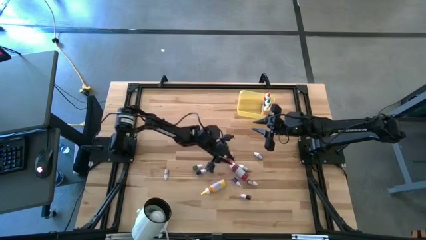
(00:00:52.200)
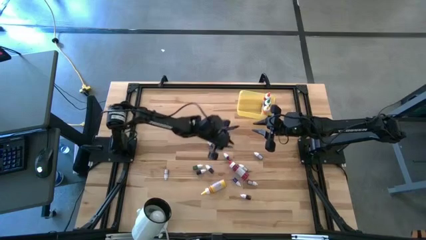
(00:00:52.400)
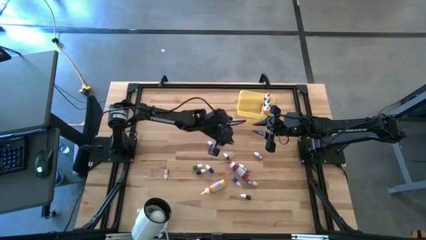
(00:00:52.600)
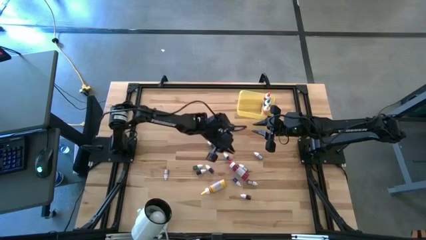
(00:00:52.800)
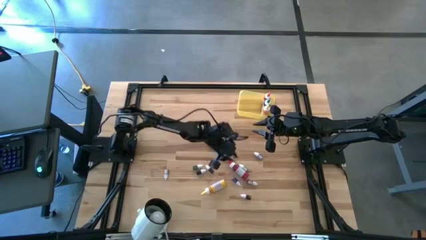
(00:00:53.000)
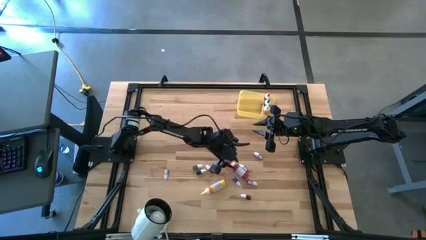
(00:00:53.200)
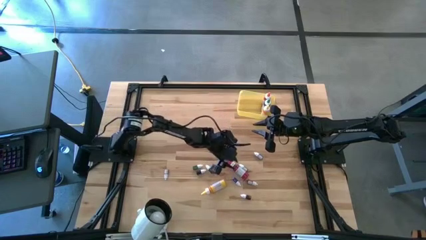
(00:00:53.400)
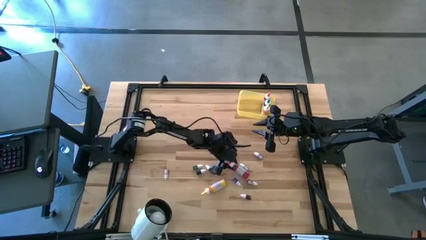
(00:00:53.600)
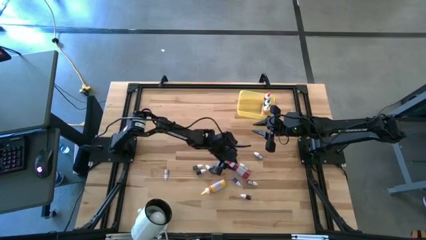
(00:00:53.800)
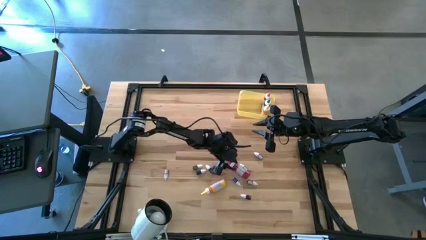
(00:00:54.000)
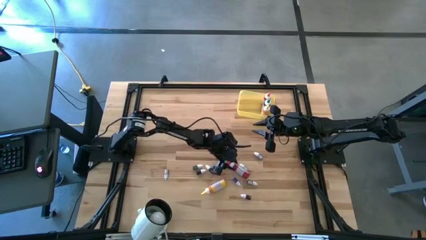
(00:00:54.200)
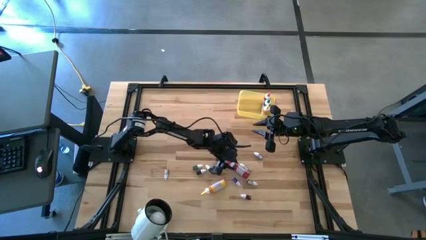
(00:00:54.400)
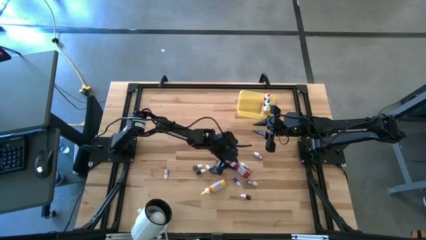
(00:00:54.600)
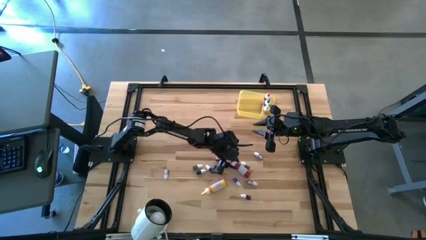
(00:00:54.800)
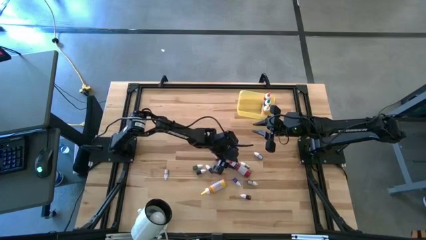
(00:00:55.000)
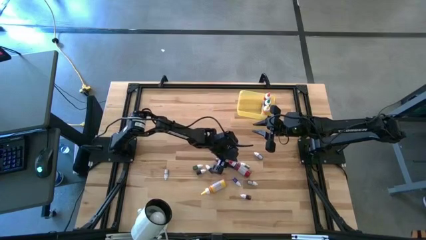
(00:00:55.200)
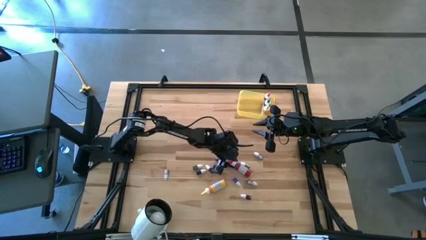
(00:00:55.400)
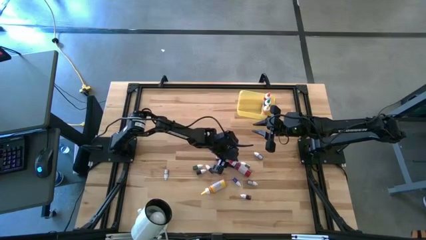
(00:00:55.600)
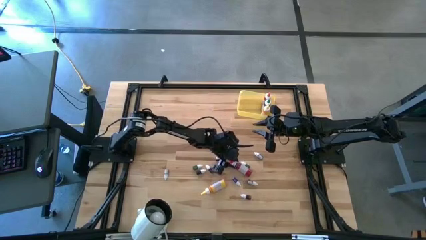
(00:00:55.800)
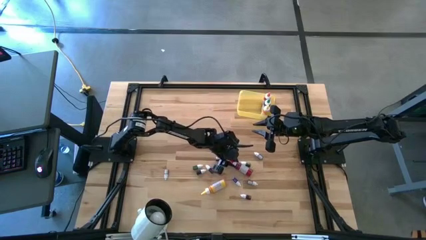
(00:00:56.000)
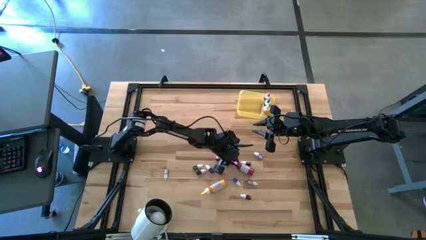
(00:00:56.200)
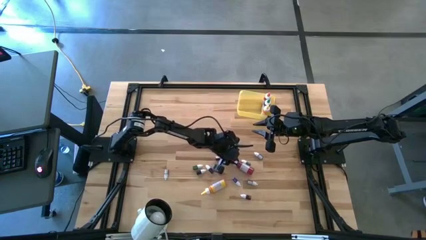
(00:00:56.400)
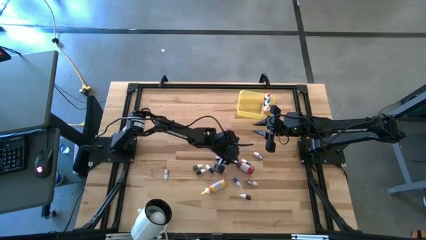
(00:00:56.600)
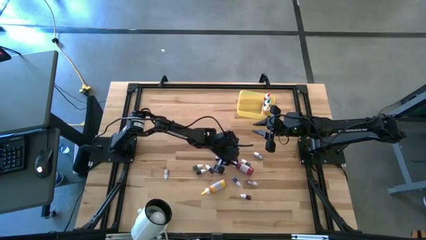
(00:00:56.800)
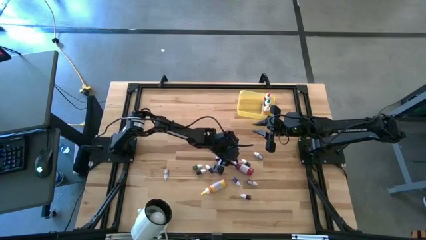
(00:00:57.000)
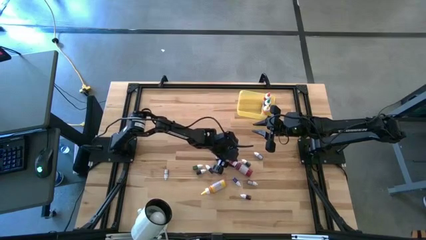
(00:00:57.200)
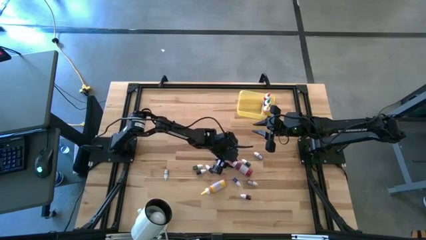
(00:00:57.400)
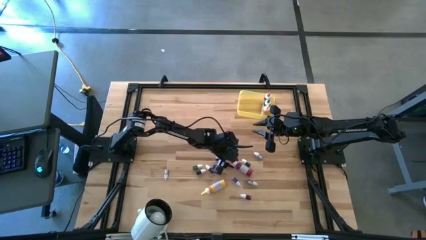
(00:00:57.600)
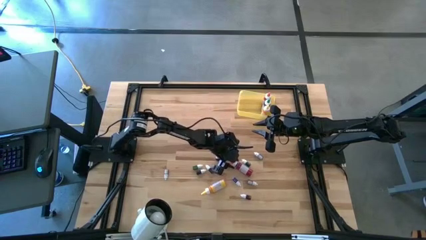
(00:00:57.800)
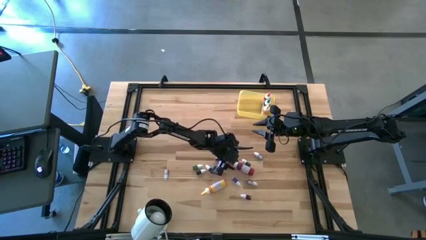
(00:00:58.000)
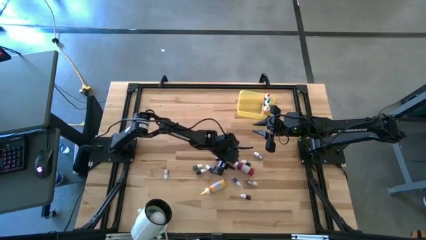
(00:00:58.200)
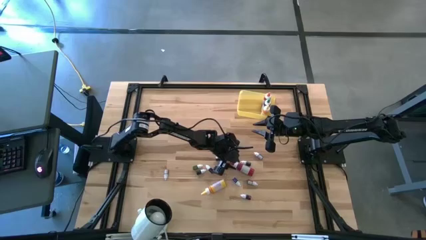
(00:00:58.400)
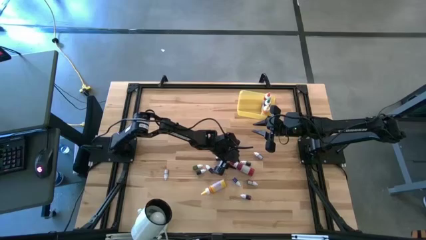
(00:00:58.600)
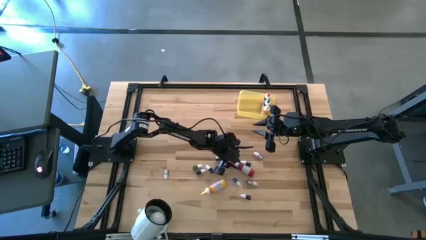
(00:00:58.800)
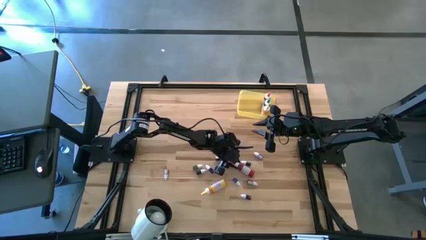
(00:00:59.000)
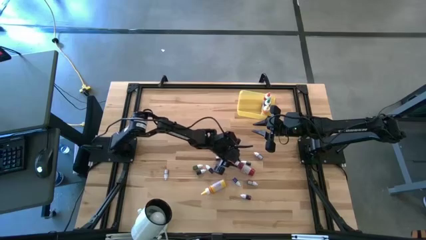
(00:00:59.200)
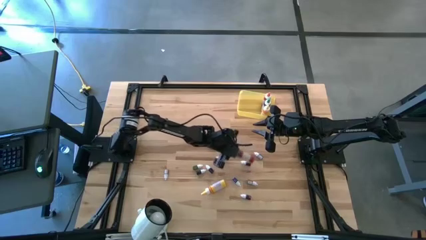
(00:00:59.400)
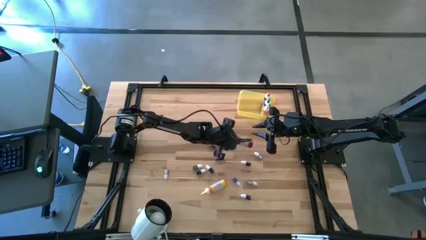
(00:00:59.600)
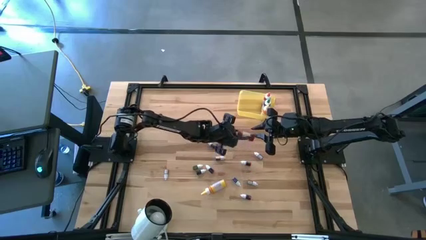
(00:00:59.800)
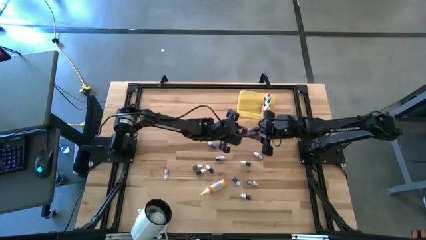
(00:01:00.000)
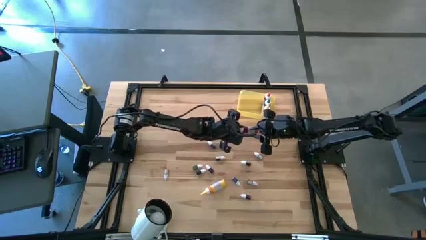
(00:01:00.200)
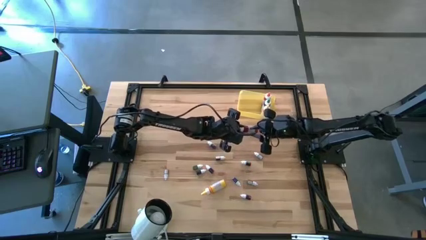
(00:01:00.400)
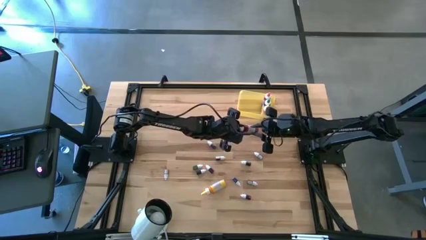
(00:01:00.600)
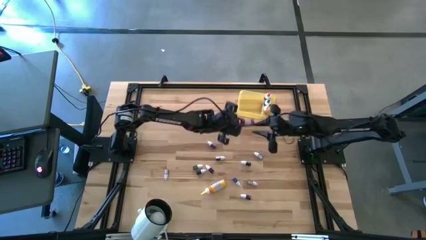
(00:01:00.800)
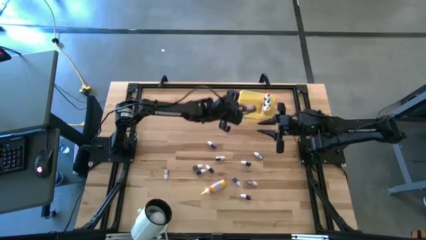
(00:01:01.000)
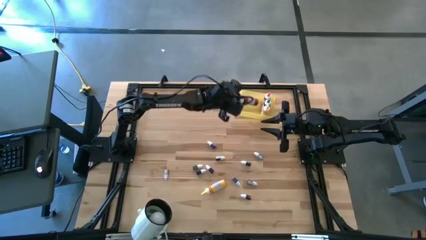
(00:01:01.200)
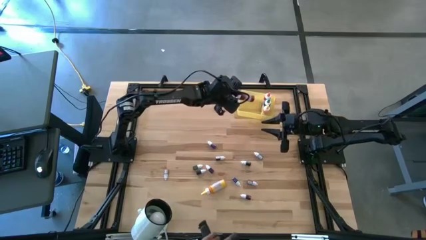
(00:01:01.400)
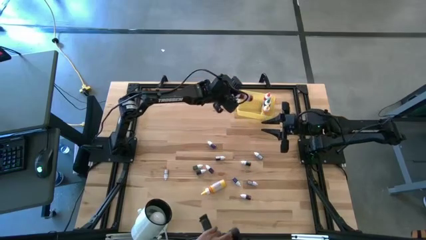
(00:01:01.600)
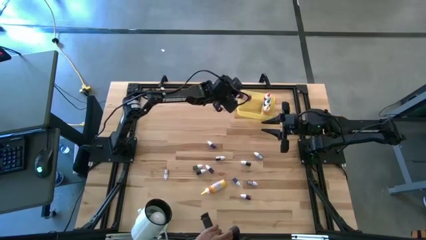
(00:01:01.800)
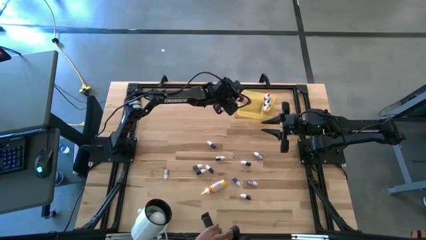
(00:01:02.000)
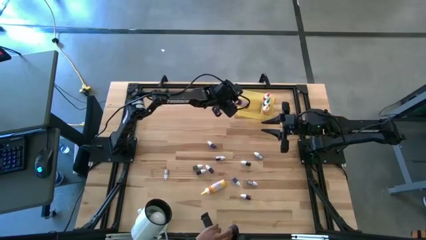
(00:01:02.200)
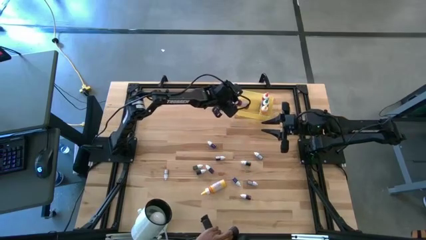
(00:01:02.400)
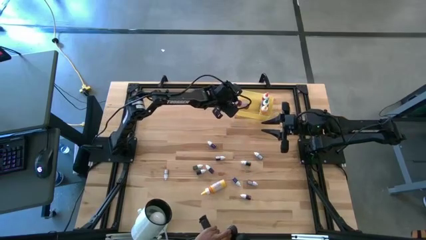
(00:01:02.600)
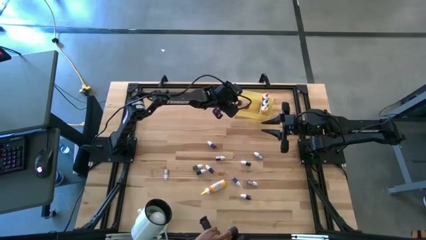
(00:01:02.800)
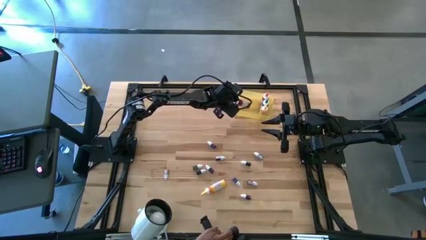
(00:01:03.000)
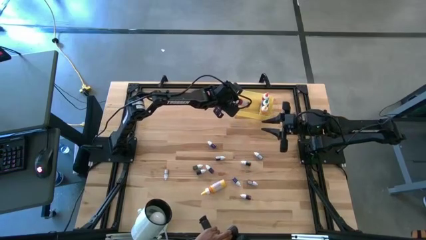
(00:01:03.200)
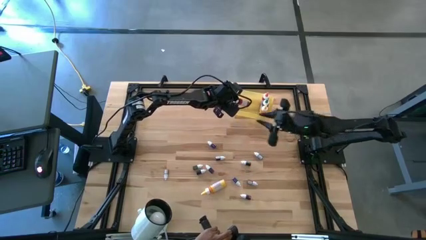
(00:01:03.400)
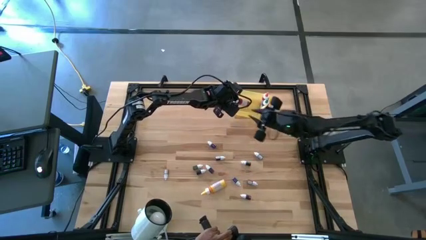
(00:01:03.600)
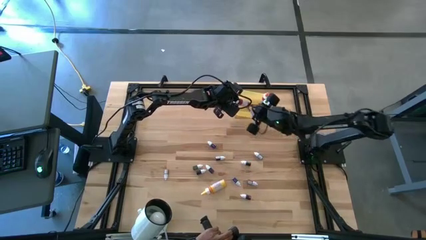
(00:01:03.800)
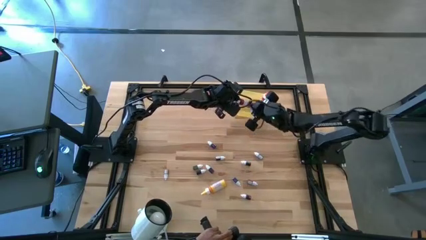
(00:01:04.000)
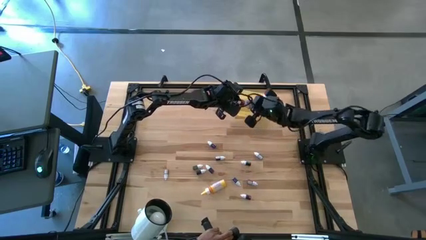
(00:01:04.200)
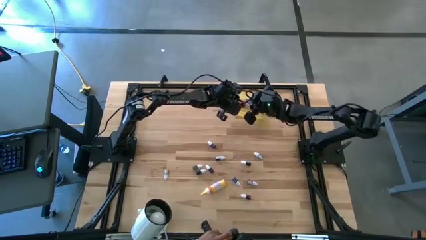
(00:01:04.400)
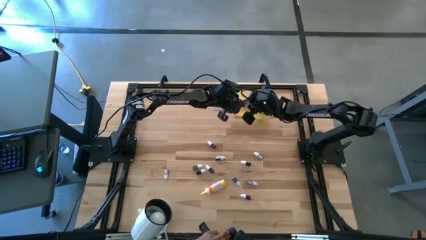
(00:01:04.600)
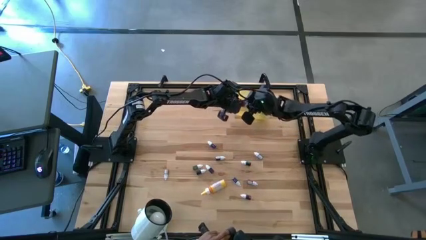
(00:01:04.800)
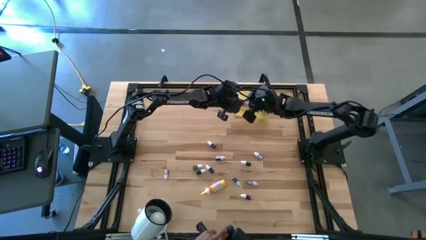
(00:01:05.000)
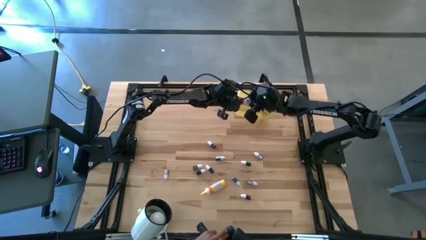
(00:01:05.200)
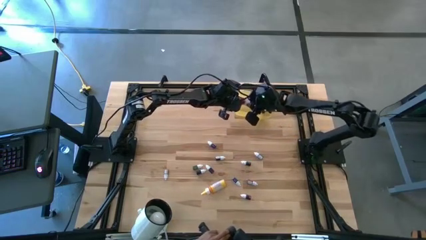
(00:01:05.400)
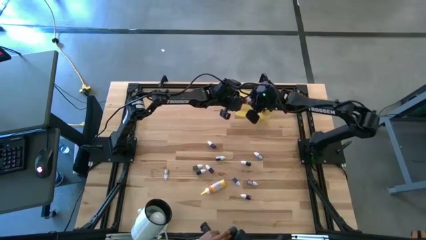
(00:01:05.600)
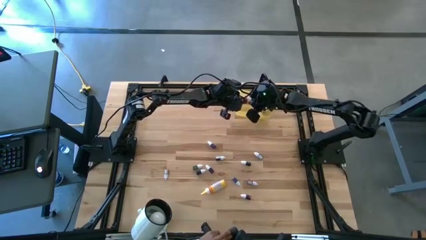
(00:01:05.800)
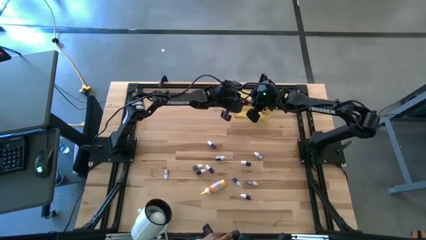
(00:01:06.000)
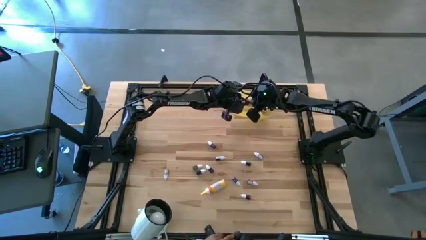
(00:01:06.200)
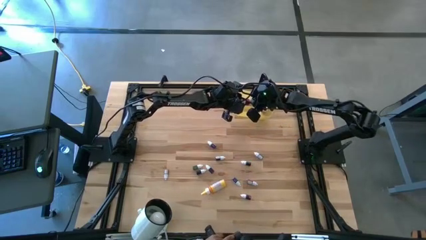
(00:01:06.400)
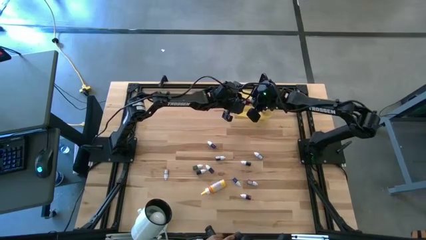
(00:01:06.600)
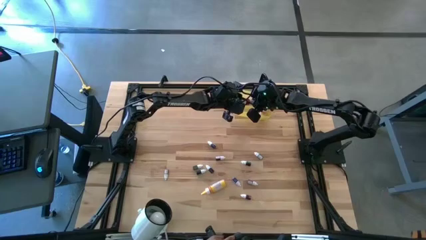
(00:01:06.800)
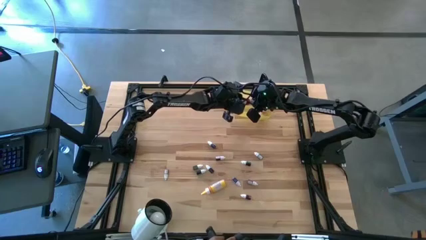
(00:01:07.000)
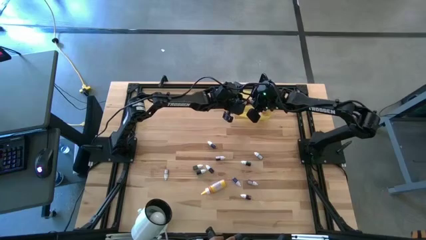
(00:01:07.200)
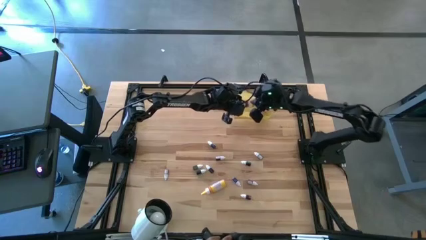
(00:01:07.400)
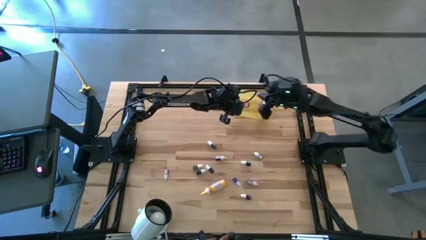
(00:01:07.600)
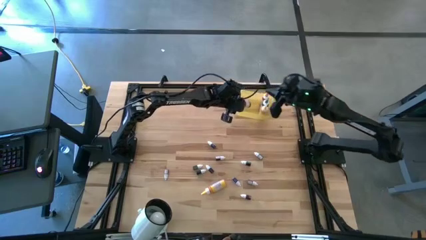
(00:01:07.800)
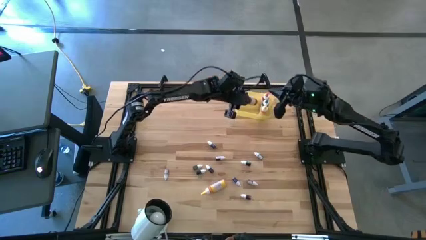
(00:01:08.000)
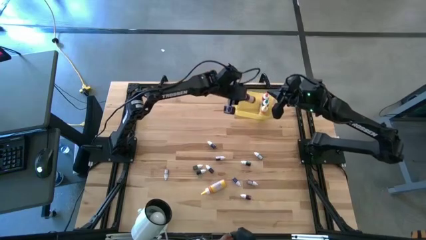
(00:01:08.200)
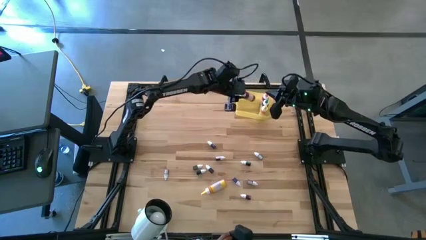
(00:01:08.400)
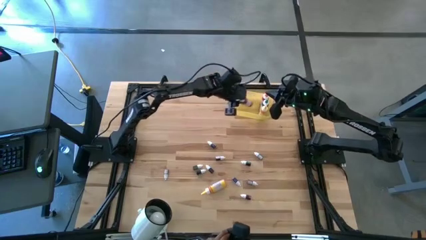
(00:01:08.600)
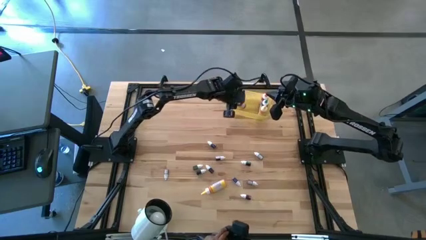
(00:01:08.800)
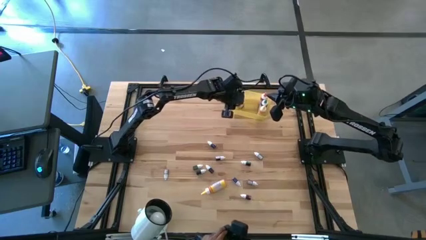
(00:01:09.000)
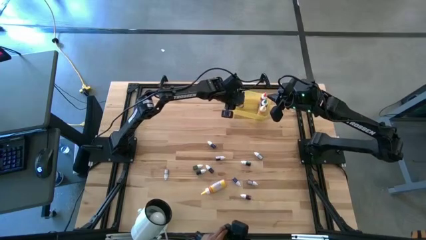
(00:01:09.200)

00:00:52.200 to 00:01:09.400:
Task: Pick & Place food coloring
Put the big red food coloring bottle into the yellow bin
